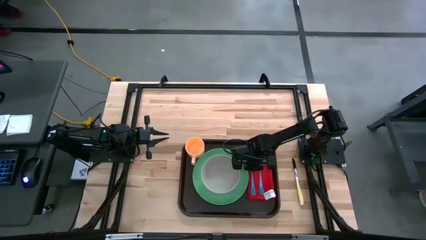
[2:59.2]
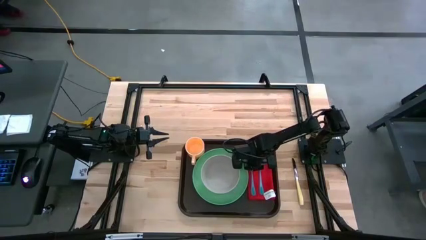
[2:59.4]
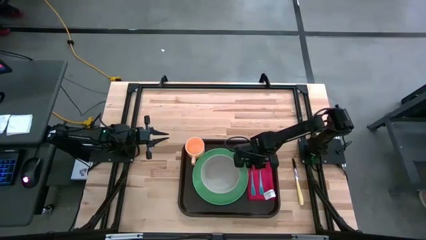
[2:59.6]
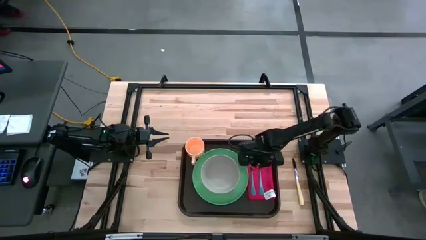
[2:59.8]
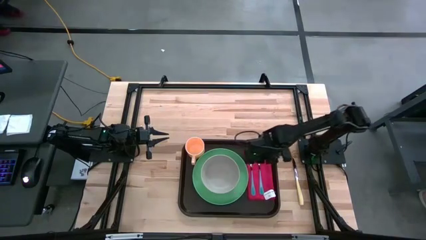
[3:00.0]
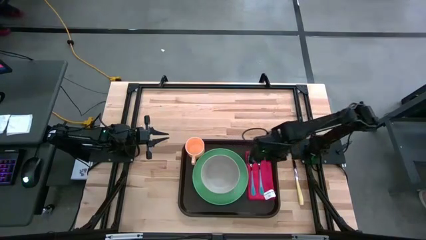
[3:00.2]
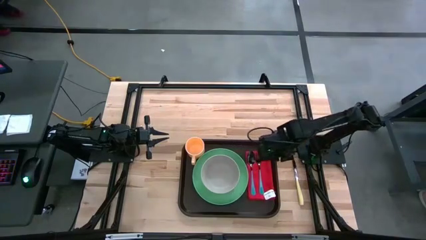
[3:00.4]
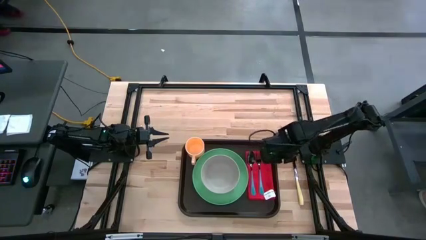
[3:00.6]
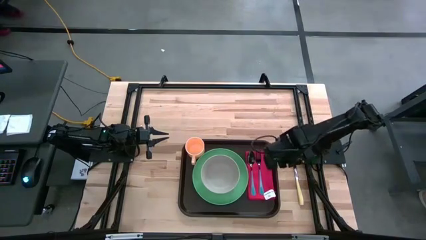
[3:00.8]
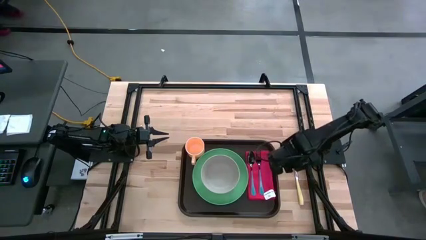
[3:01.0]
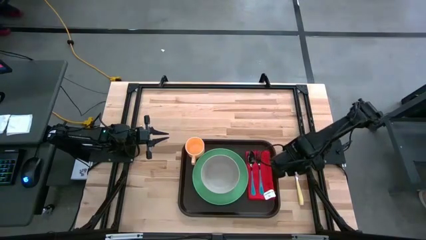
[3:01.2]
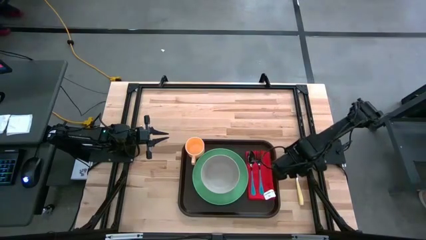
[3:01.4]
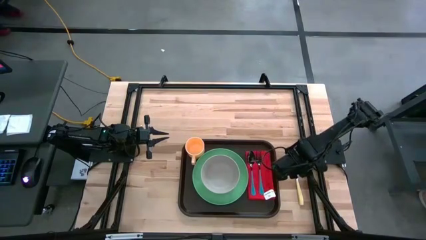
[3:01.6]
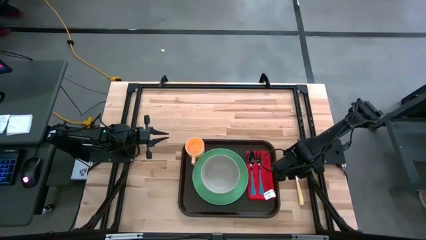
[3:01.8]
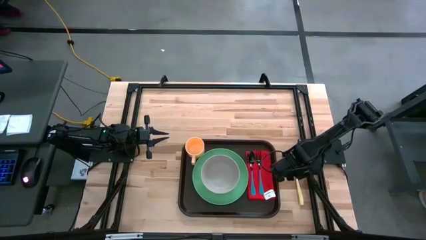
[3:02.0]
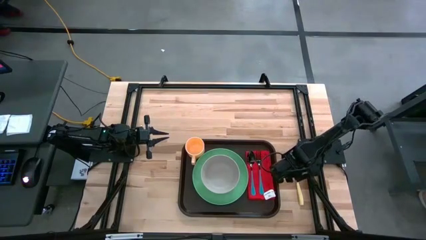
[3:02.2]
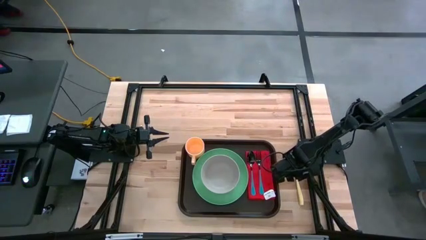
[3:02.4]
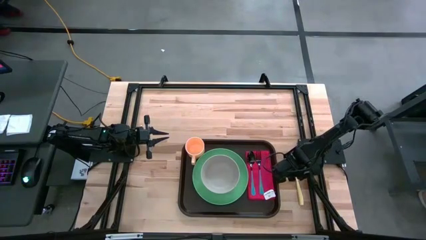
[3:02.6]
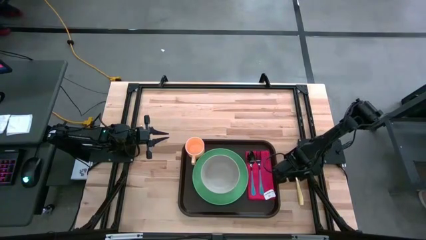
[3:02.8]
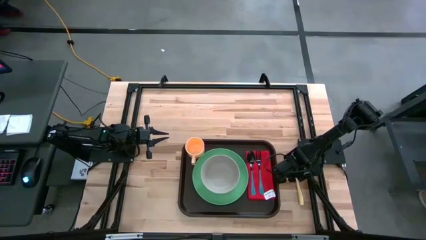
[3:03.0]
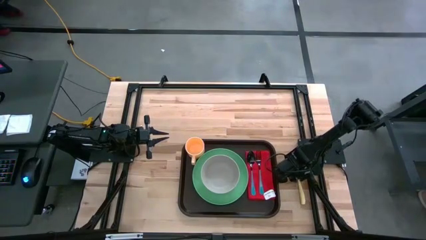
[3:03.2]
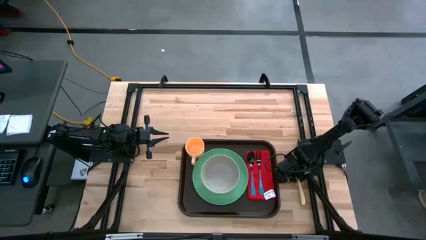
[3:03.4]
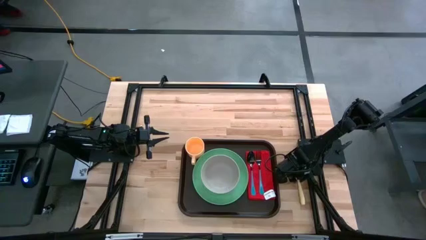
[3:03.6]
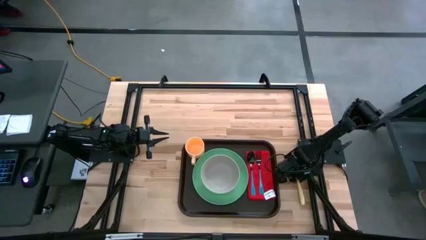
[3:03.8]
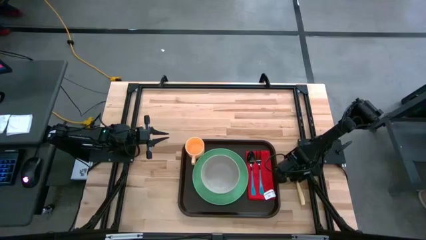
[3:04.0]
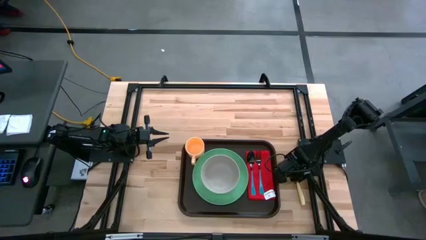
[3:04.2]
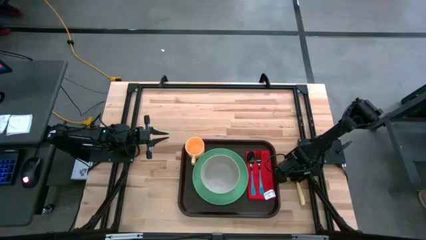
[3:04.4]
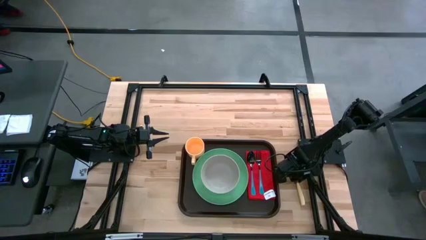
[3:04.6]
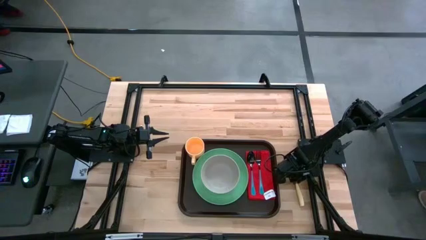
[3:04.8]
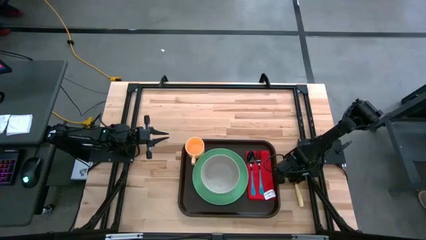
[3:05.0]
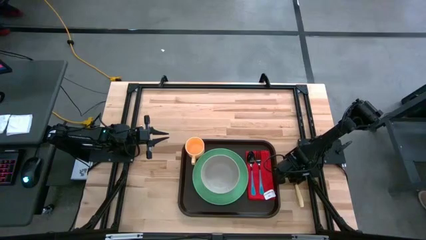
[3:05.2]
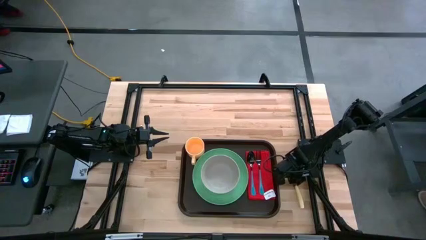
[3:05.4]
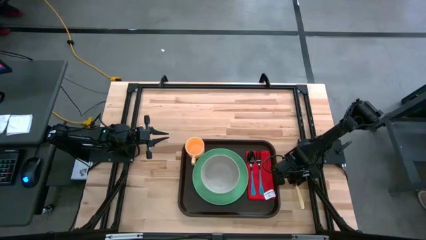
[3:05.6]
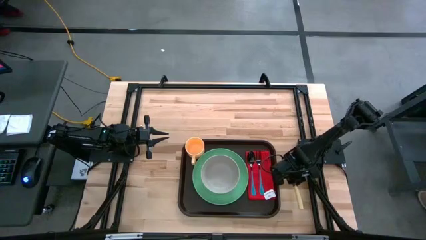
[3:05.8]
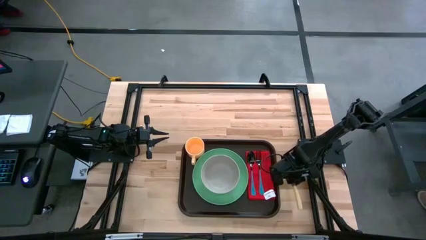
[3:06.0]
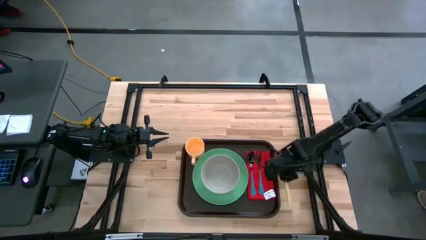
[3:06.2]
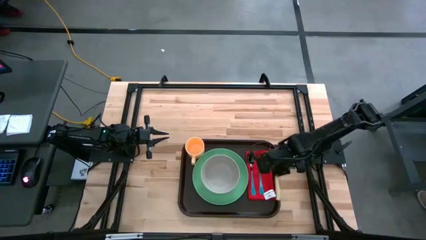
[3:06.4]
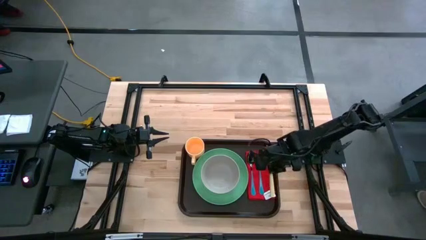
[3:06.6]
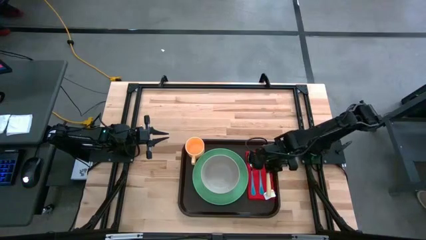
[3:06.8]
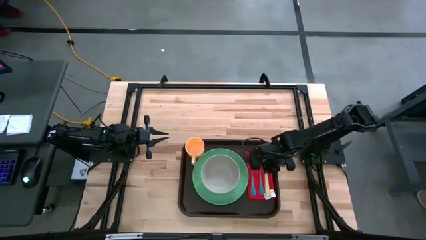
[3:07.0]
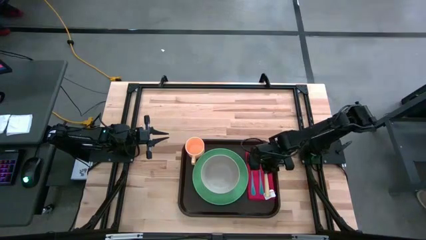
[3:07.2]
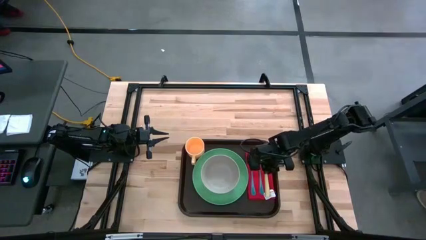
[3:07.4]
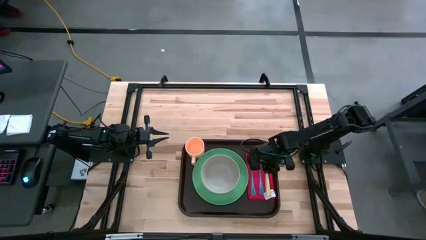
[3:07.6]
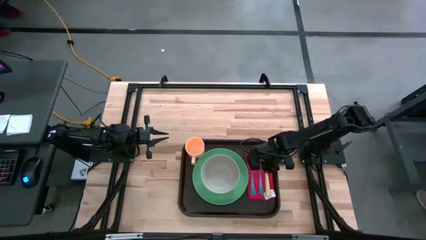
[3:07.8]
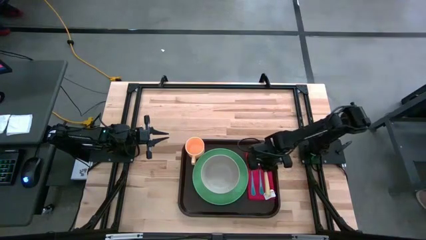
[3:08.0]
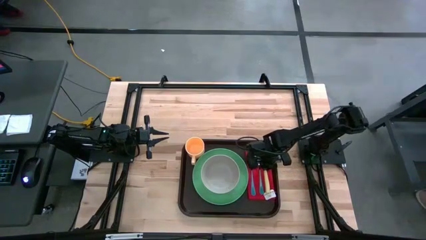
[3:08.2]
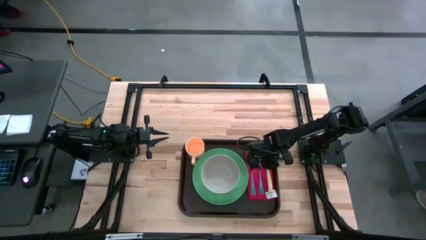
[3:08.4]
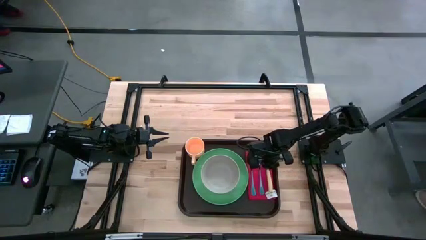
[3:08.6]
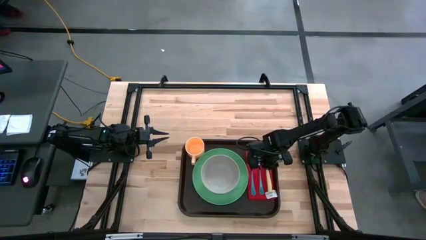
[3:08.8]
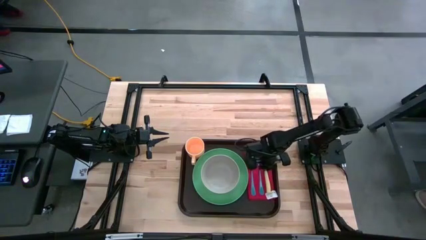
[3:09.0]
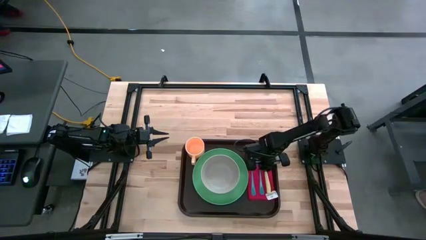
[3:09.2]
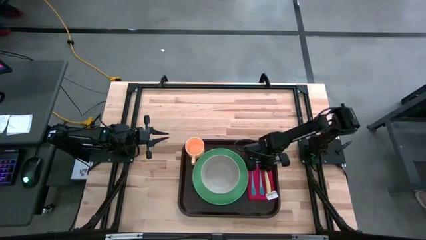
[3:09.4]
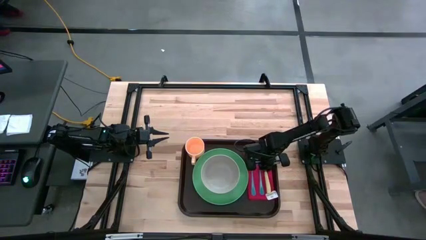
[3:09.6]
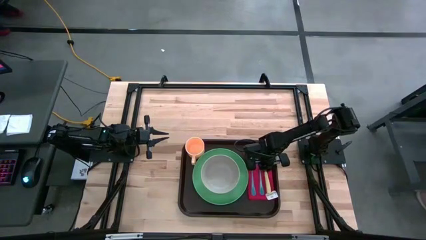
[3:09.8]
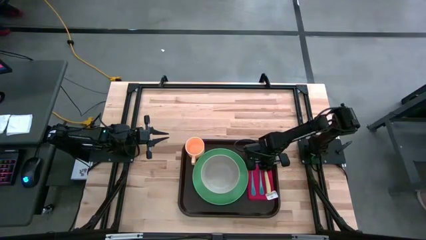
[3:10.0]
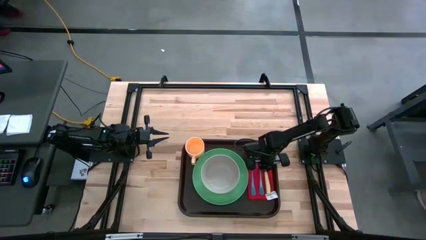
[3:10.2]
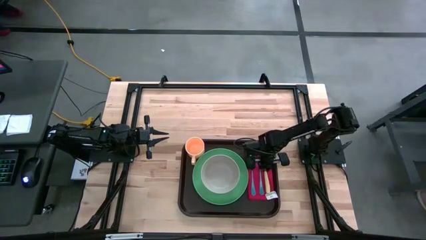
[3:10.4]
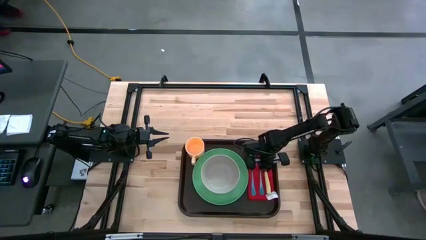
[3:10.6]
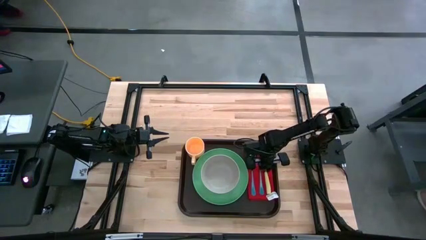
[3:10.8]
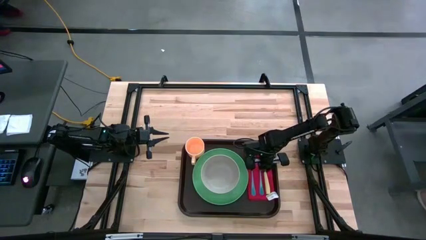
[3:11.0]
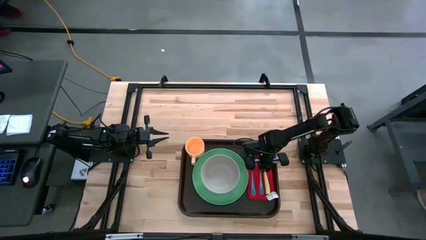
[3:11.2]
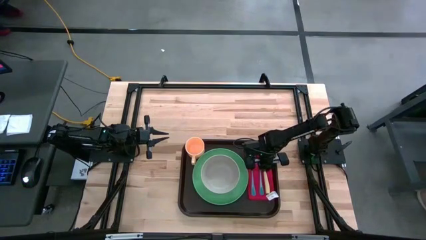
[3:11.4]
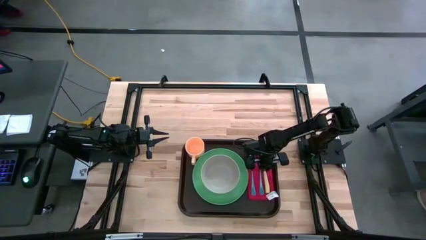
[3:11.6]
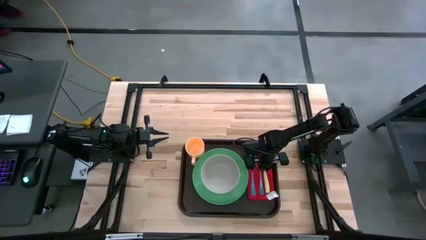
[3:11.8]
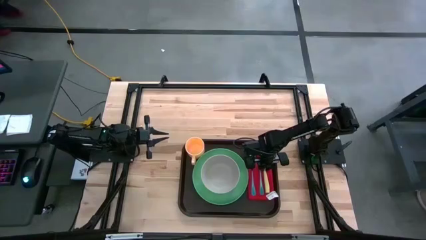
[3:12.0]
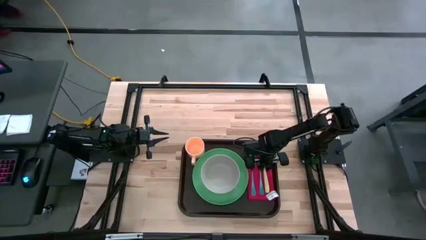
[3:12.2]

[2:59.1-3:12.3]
Task: Set up tray
Put the white knife on top of the red table napkin

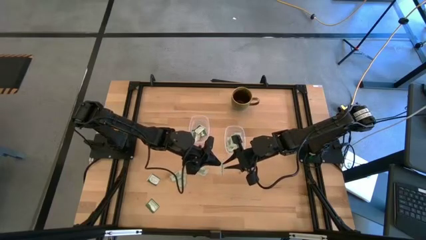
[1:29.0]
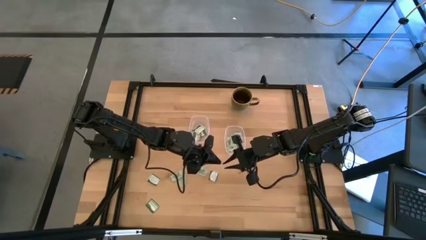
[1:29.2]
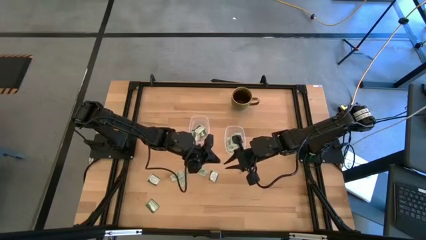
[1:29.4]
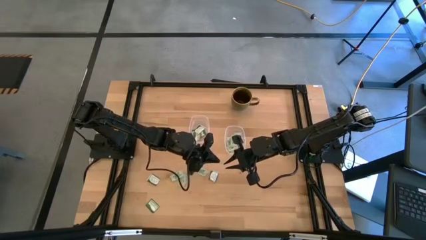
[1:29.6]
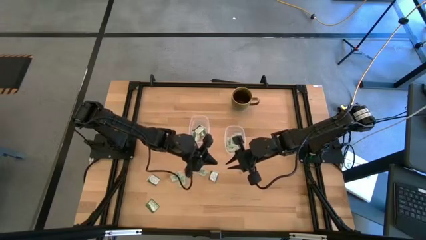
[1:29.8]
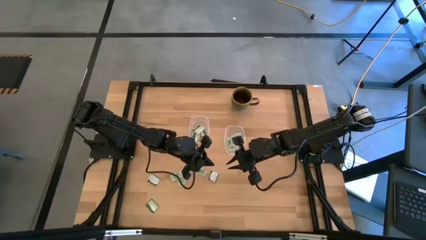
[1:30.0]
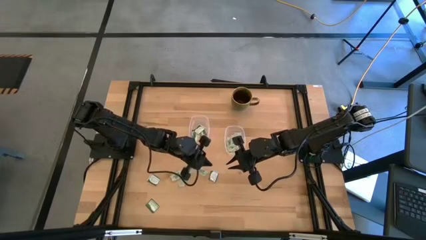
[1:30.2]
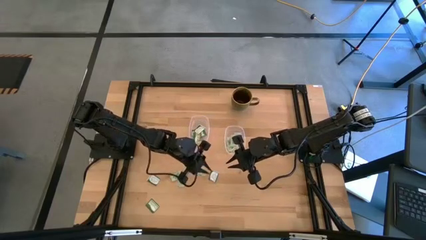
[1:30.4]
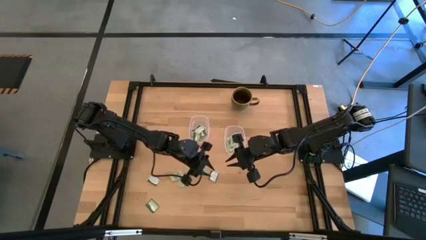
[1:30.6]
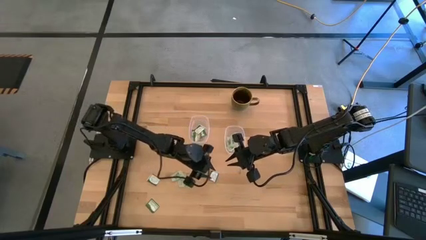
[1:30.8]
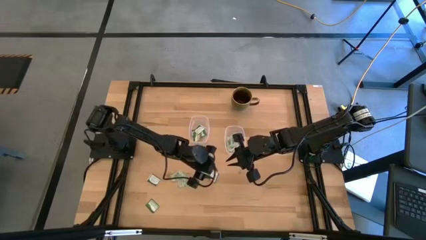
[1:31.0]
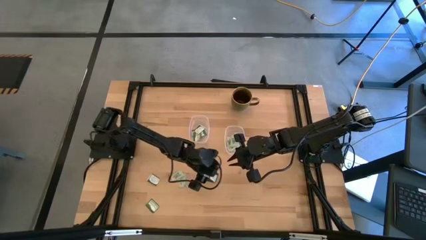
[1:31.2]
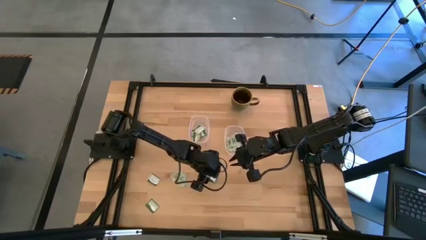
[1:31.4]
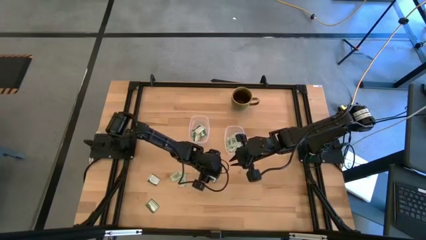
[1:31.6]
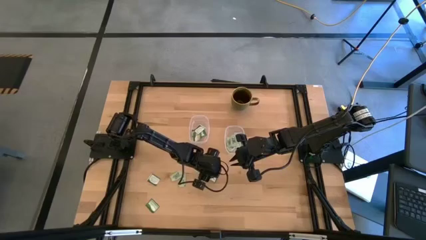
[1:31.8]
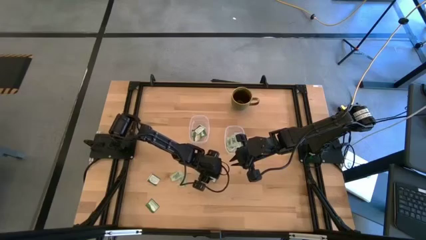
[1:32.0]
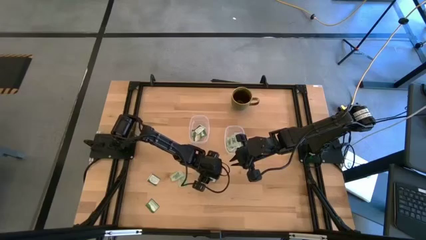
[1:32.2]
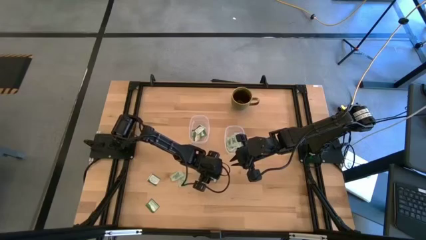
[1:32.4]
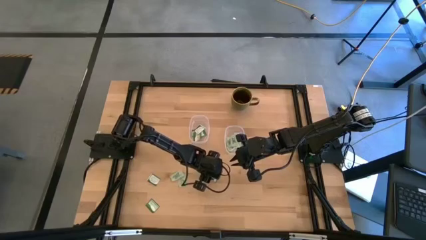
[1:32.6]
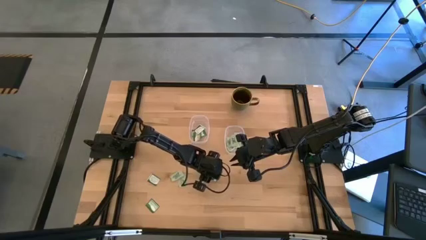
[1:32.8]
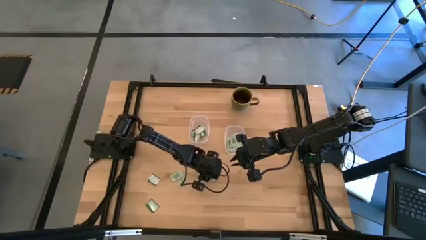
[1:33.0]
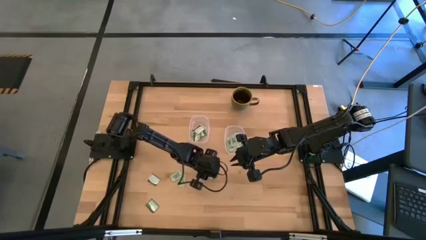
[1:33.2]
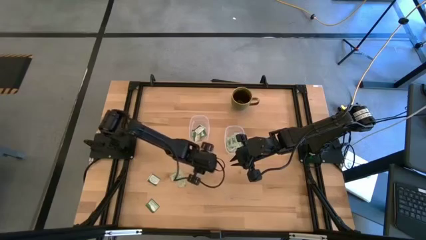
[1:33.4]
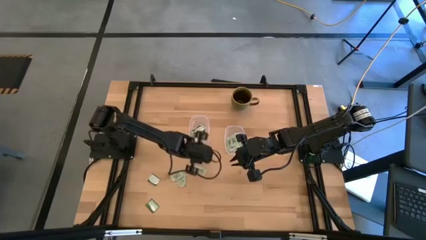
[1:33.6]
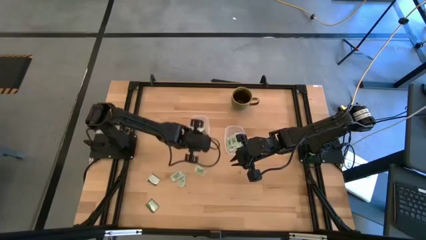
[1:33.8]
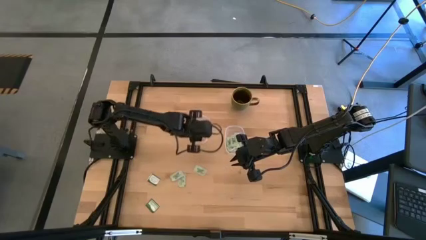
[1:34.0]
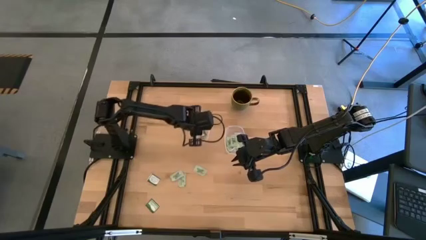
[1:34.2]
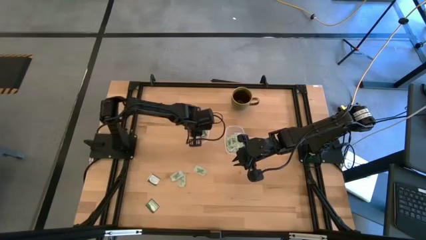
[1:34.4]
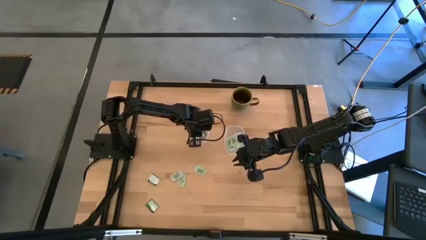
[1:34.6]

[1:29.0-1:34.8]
Task: Pick and place items into bin
Put the truvia packet into the left transparent bin
